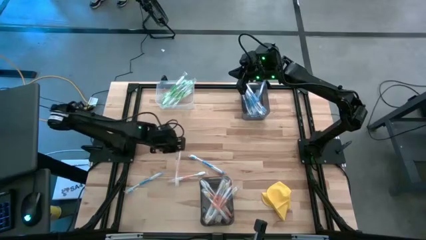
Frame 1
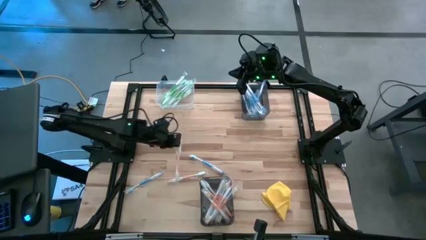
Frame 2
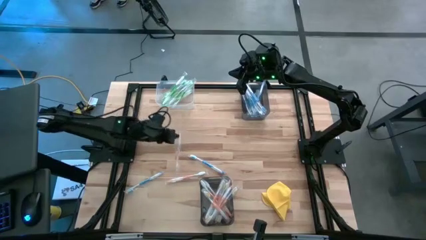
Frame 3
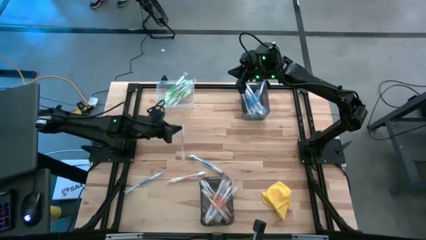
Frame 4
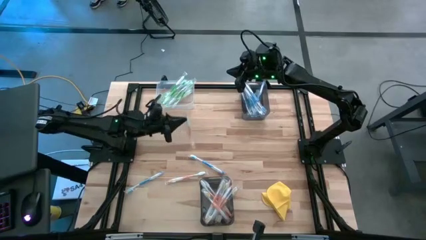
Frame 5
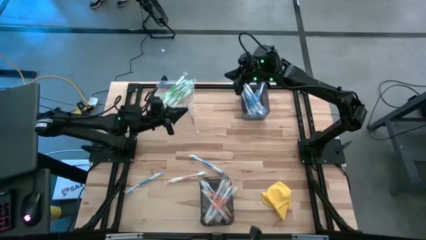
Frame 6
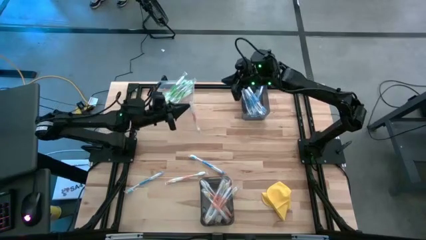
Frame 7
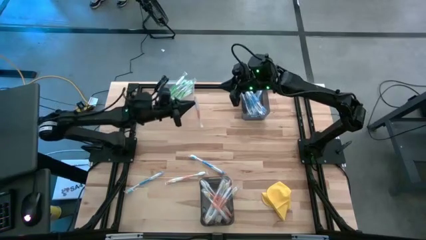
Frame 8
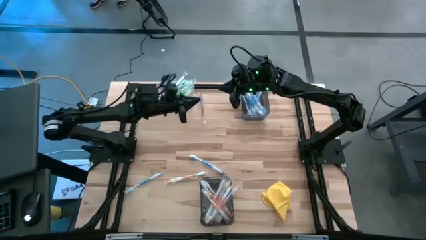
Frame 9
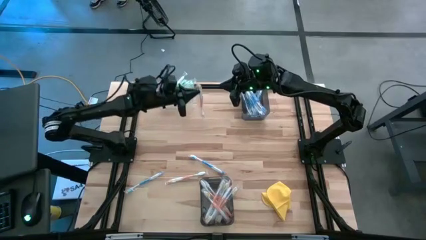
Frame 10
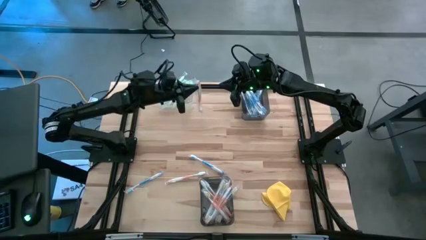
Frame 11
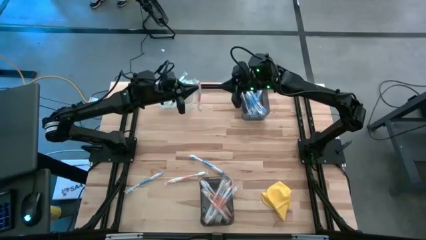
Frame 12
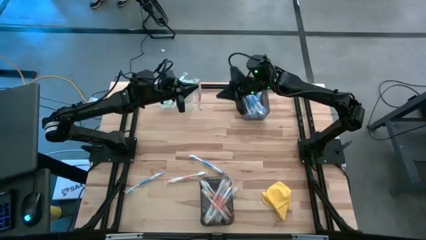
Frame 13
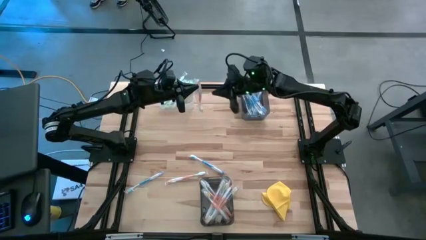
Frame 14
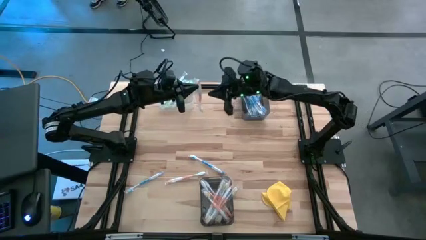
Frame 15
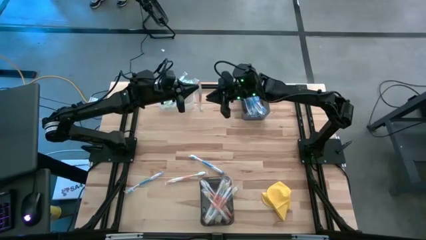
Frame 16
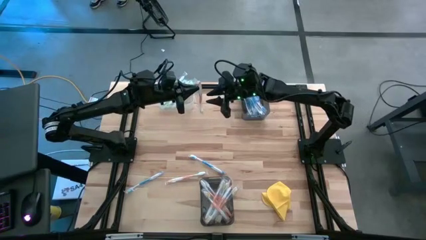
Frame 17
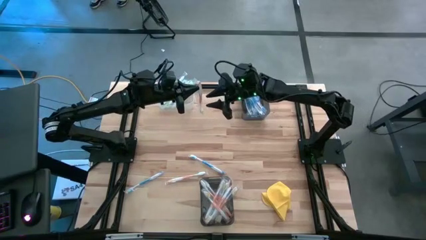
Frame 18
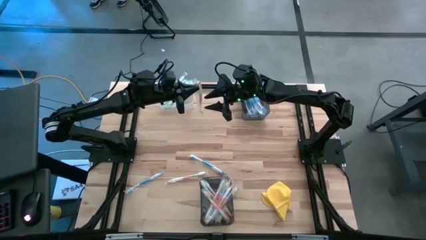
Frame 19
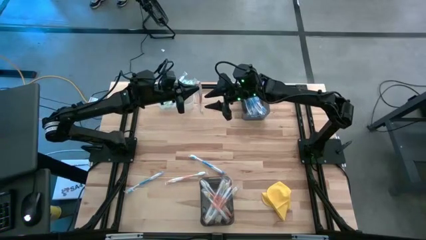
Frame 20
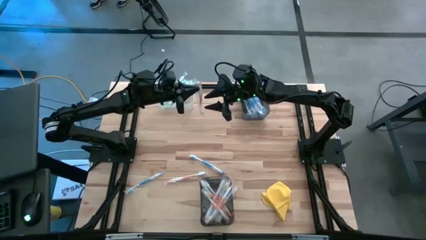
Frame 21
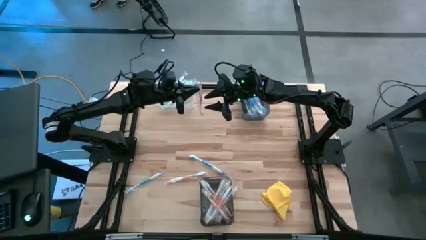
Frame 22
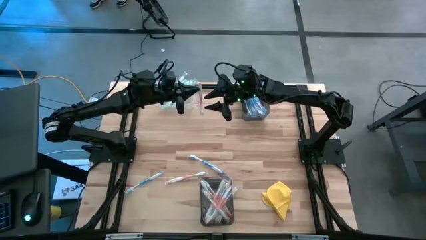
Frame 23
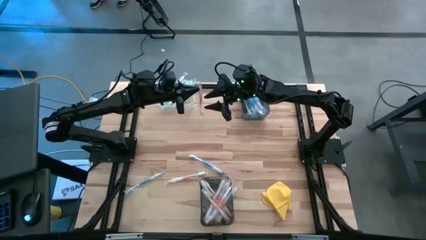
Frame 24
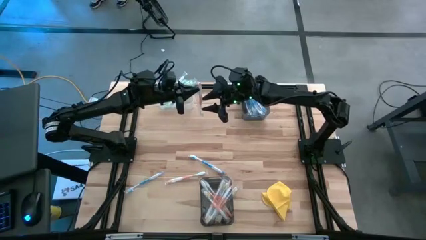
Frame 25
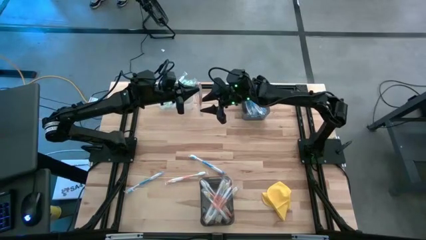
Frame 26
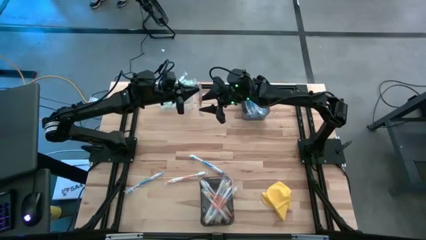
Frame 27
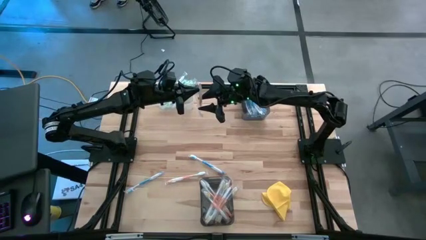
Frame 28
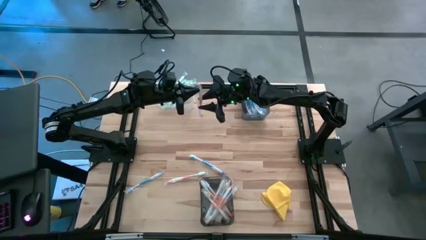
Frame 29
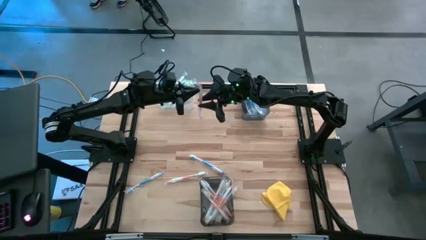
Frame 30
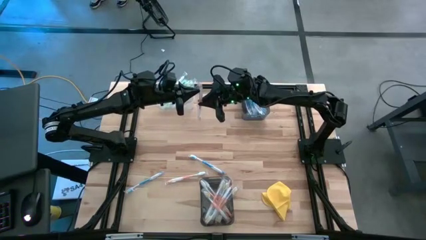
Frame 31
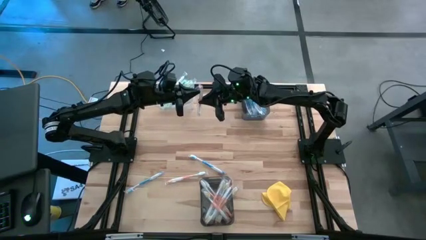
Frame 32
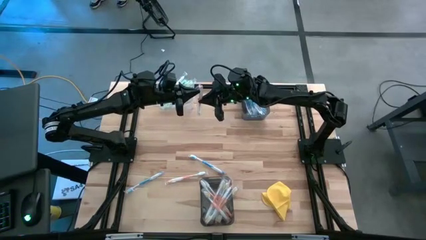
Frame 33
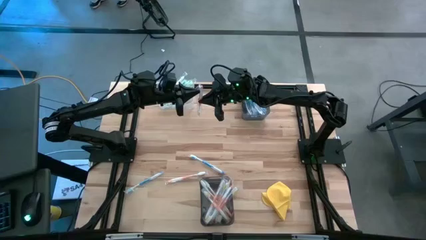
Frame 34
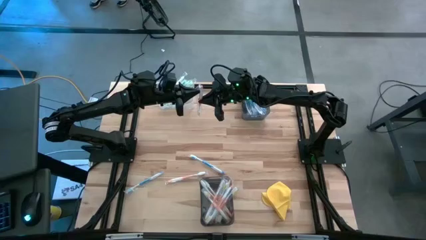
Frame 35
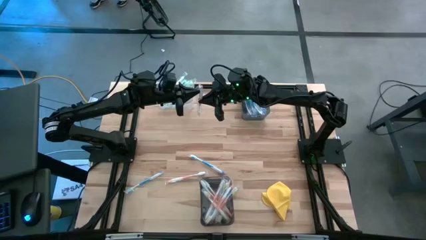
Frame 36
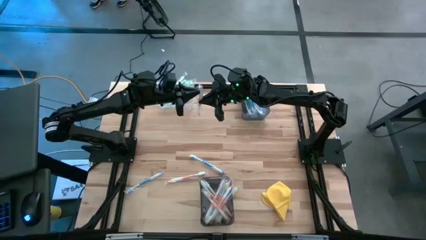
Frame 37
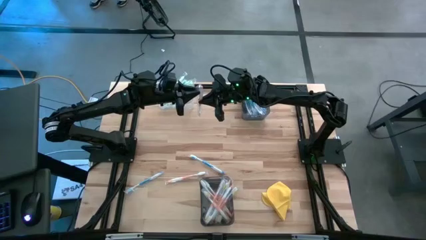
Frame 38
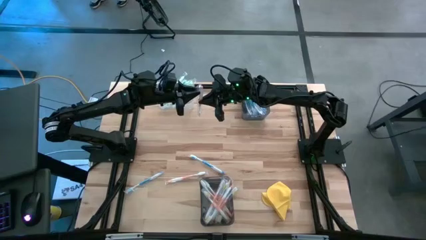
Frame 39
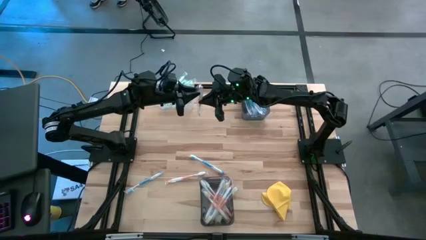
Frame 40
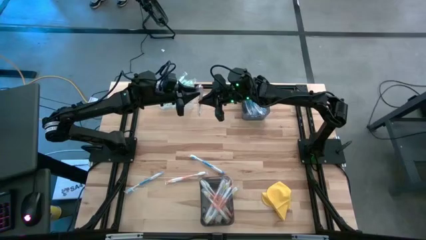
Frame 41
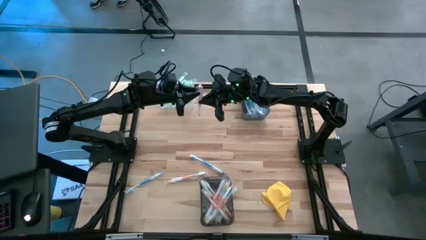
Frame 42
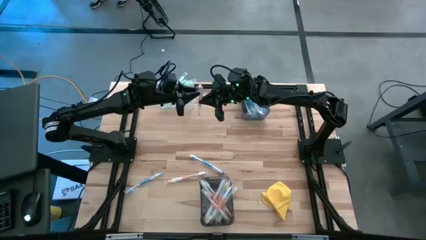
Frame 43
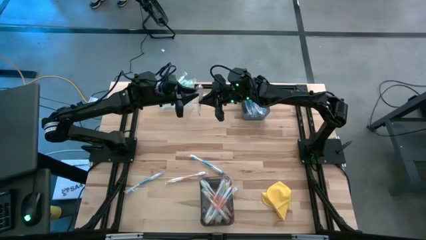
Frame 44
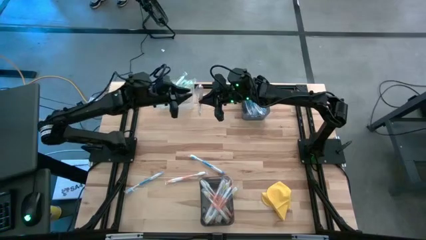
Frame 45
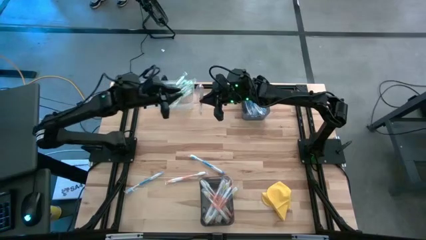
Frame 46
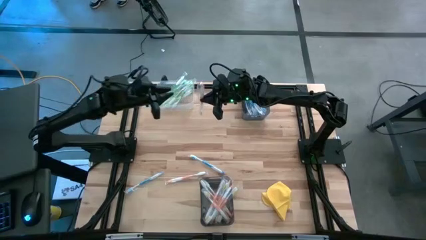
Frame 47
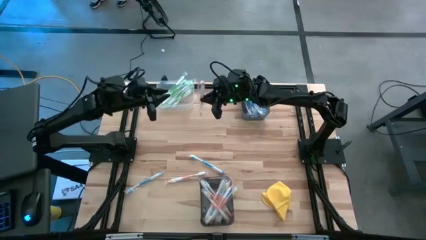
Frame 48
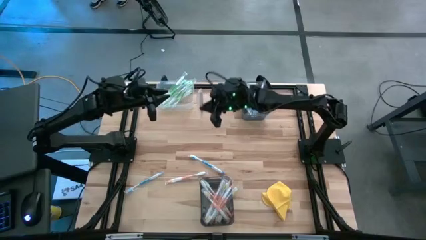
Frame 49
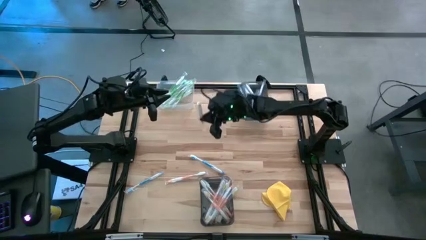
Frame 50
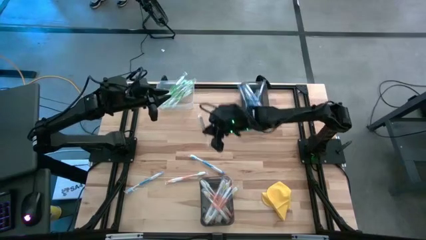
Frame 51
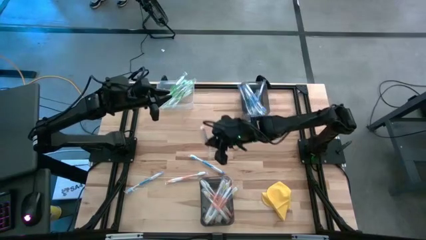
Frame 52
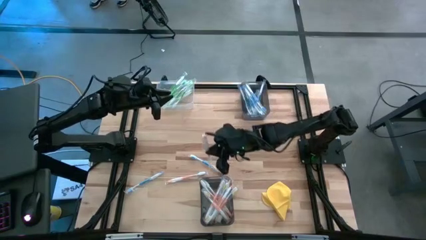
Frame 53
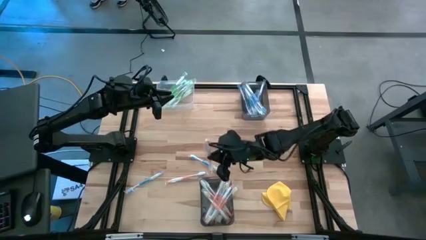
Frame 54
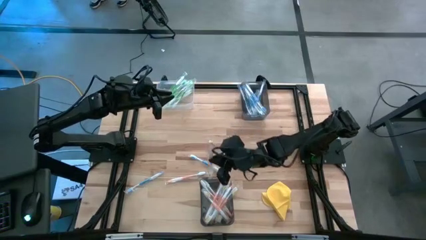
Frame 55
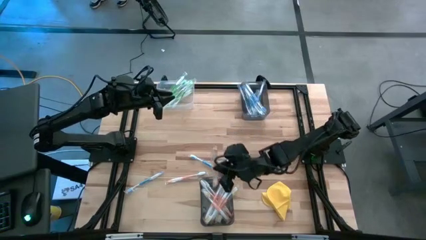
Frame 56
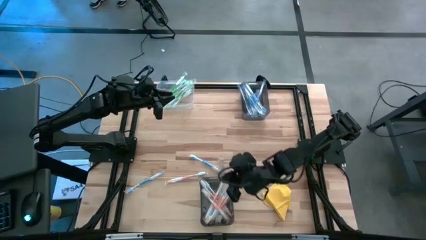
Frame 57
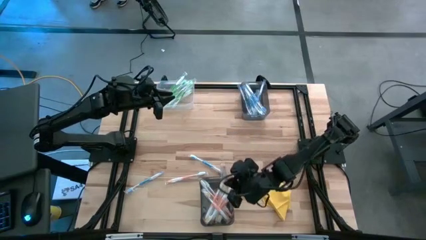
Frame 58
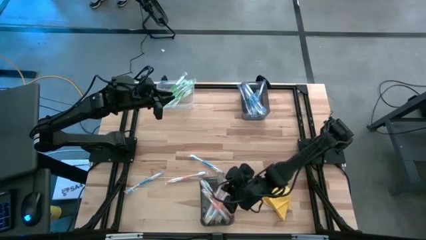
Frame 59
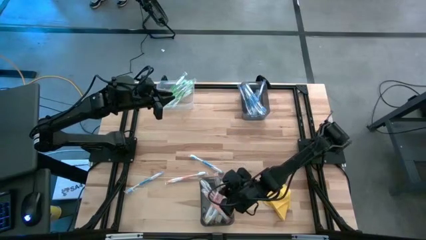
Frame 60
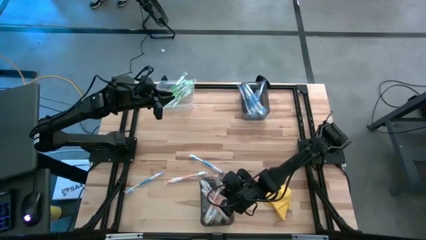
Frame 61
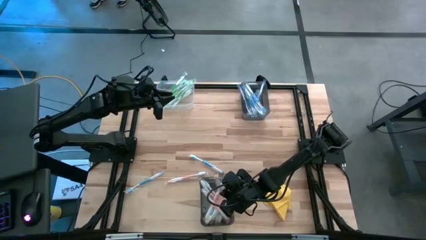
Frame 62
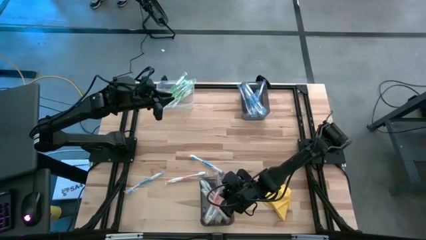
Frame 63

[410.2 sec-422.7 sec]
Task: Pick & Place Toothbrushes
Put the orange toothbrush into the bottom black bin
